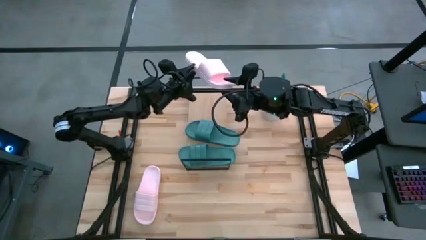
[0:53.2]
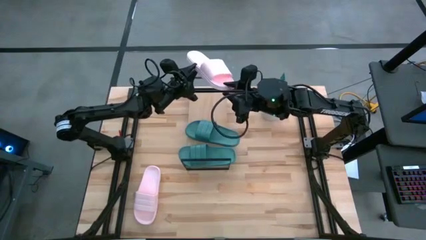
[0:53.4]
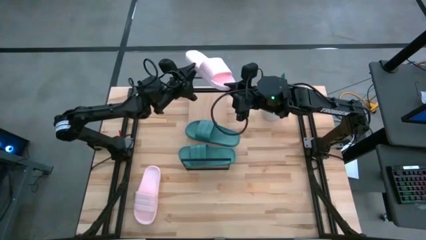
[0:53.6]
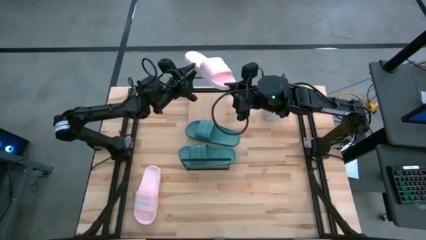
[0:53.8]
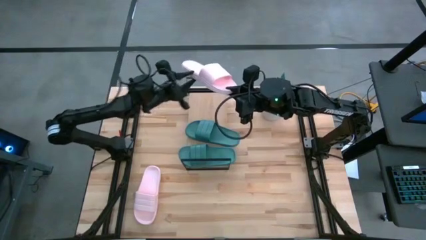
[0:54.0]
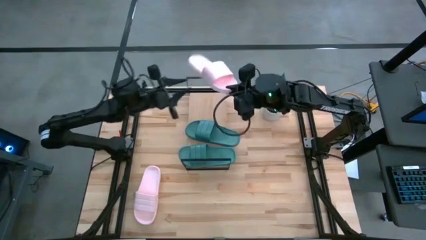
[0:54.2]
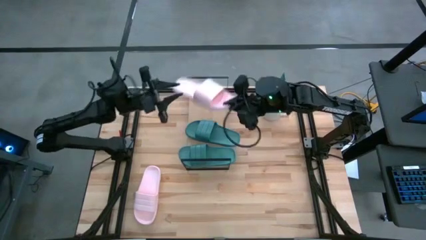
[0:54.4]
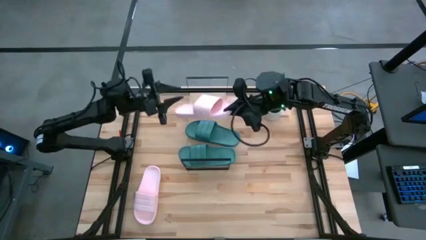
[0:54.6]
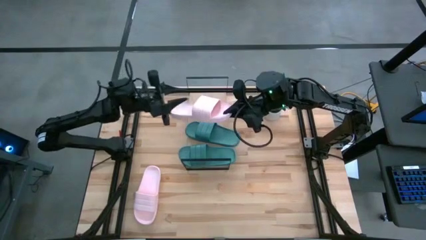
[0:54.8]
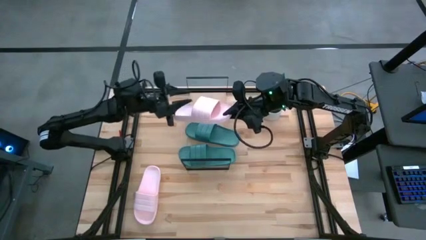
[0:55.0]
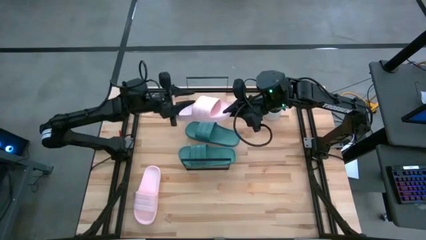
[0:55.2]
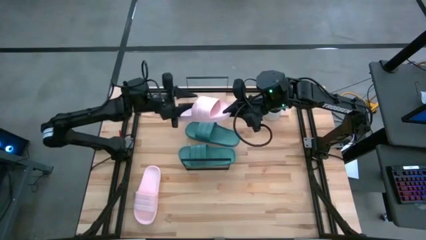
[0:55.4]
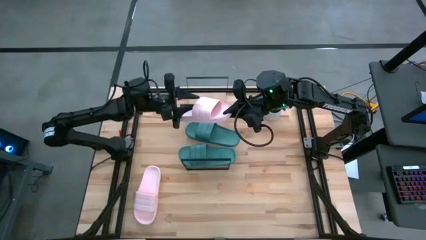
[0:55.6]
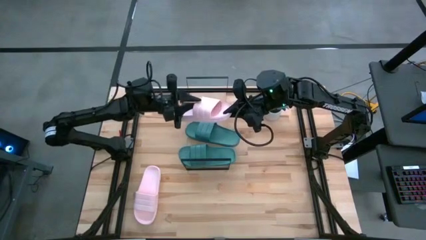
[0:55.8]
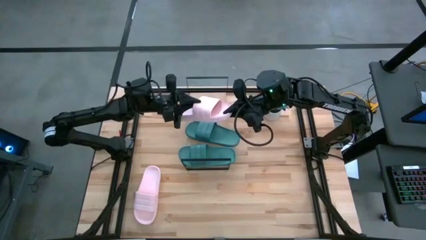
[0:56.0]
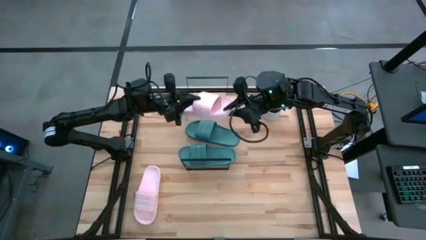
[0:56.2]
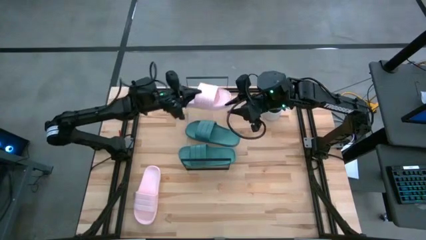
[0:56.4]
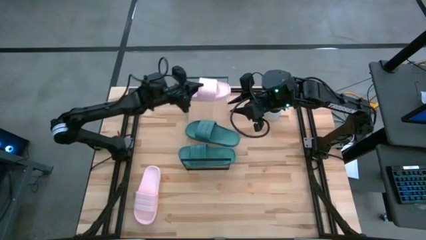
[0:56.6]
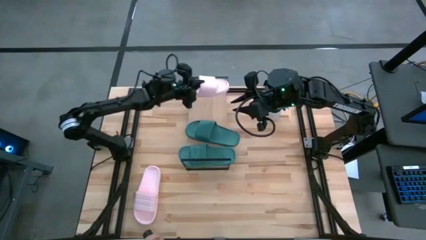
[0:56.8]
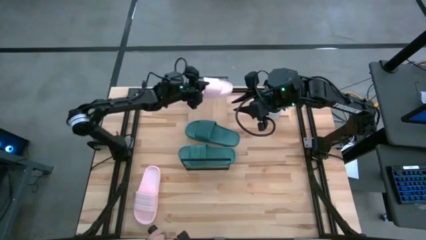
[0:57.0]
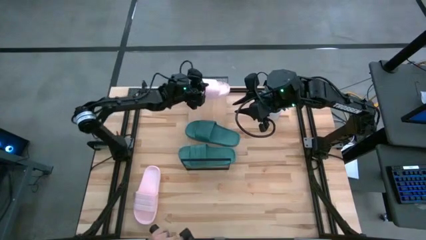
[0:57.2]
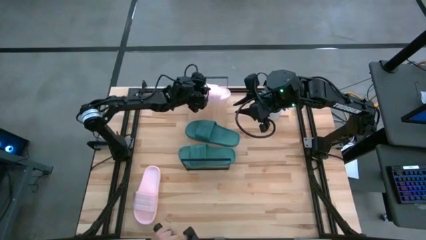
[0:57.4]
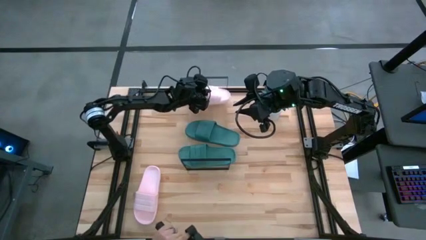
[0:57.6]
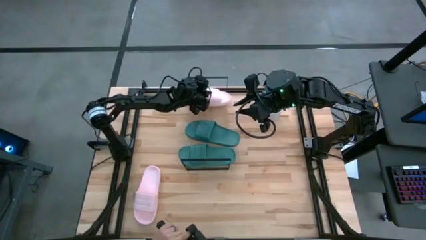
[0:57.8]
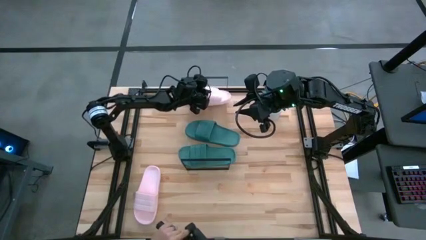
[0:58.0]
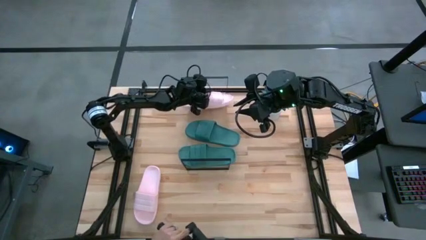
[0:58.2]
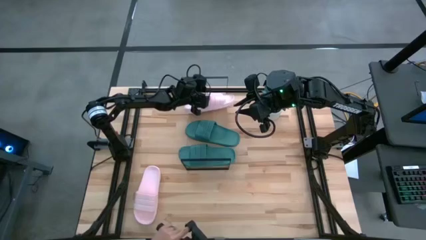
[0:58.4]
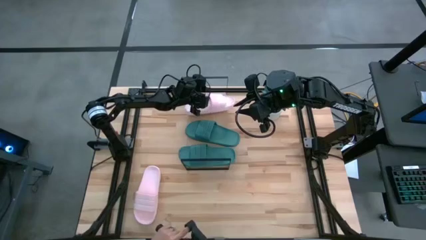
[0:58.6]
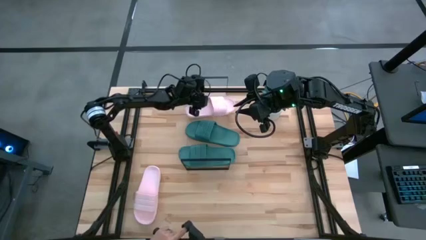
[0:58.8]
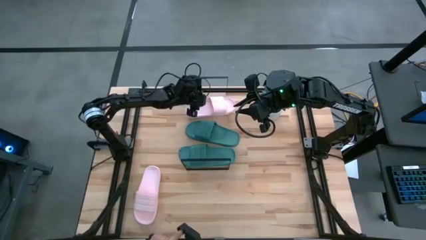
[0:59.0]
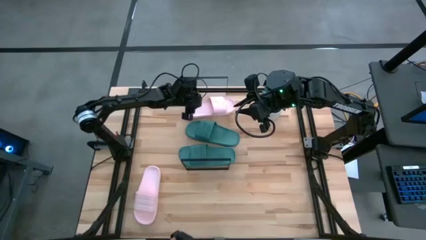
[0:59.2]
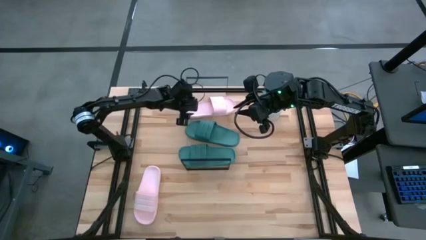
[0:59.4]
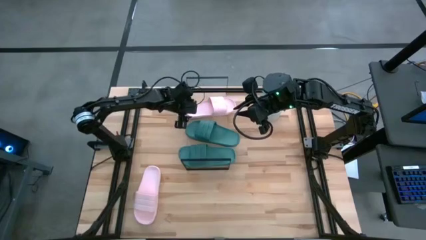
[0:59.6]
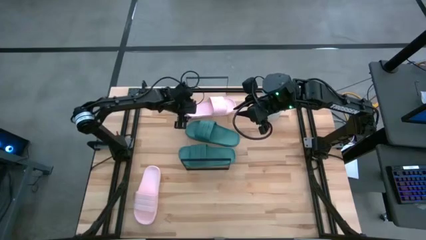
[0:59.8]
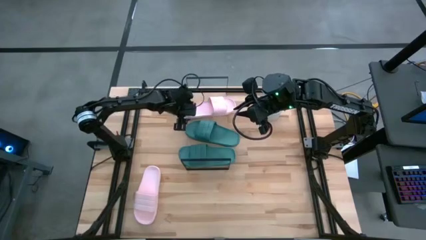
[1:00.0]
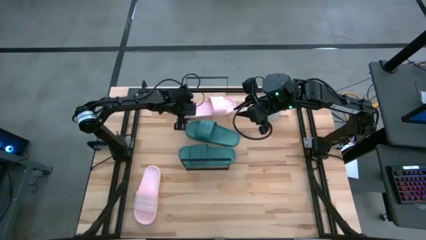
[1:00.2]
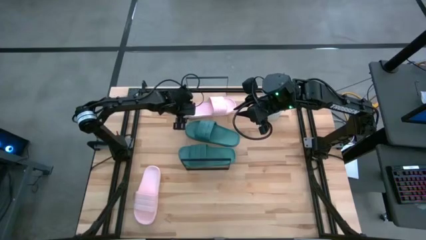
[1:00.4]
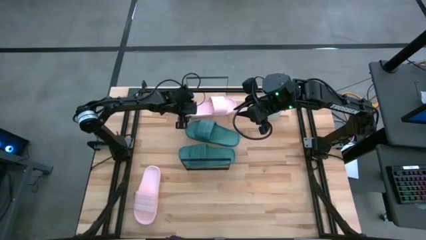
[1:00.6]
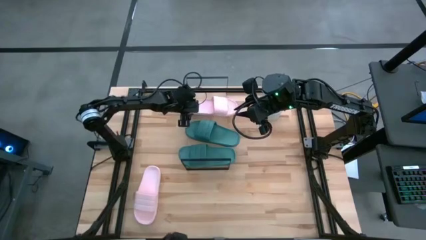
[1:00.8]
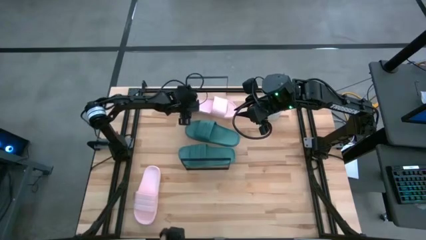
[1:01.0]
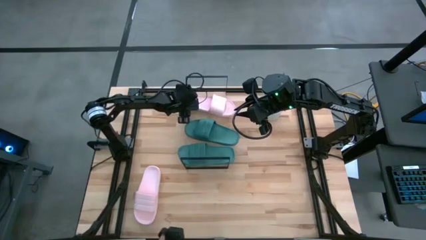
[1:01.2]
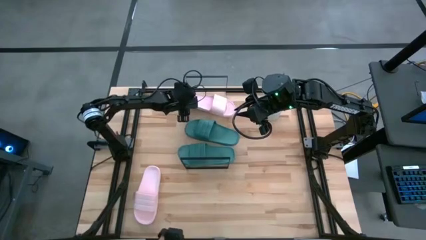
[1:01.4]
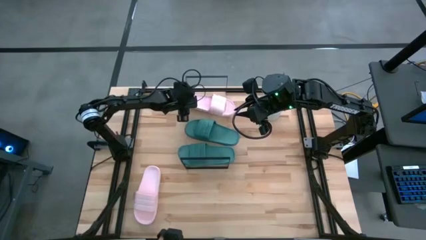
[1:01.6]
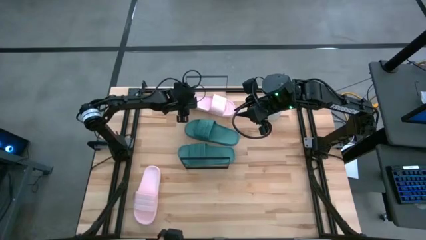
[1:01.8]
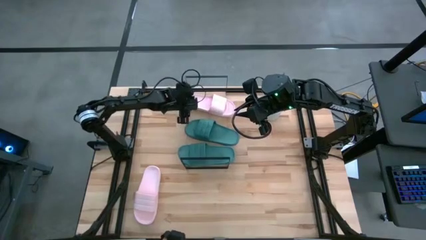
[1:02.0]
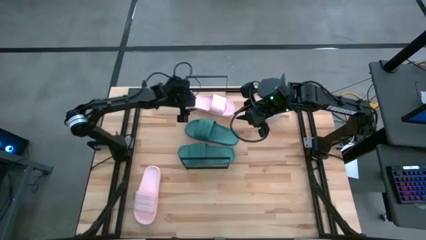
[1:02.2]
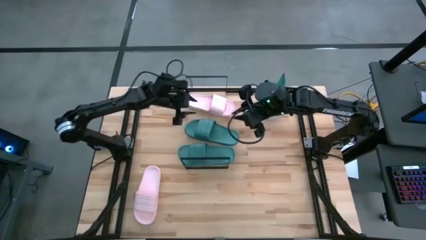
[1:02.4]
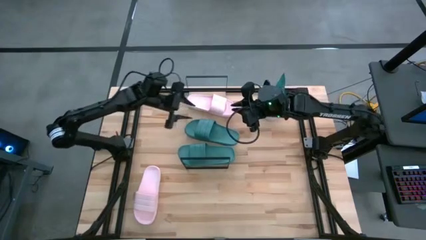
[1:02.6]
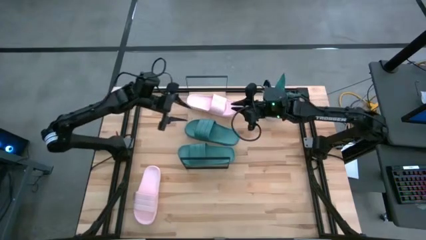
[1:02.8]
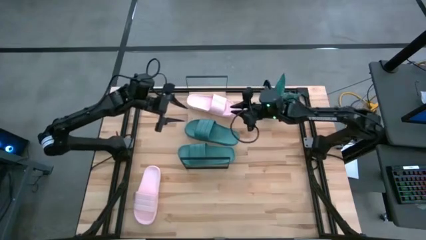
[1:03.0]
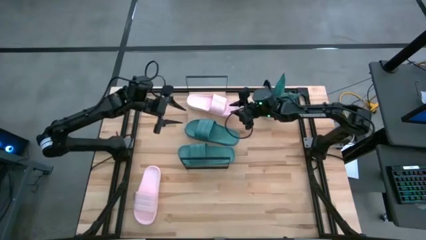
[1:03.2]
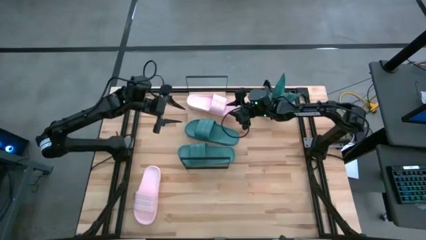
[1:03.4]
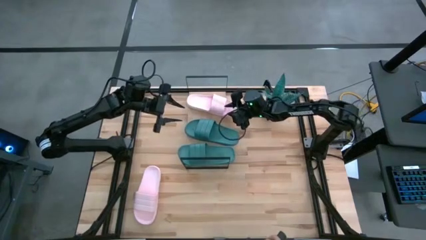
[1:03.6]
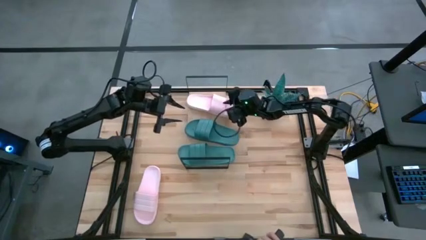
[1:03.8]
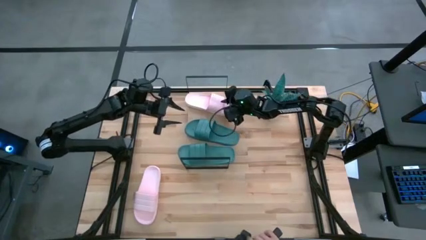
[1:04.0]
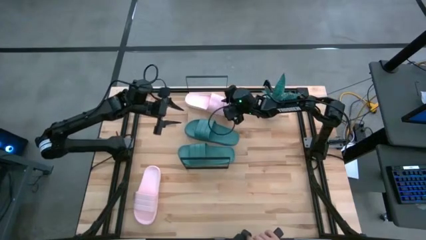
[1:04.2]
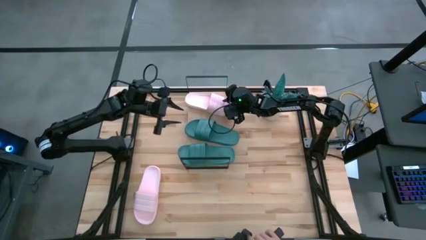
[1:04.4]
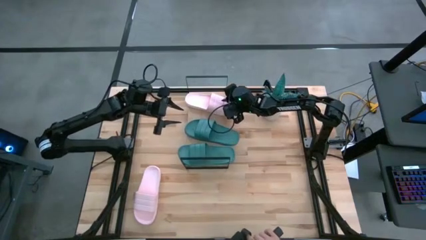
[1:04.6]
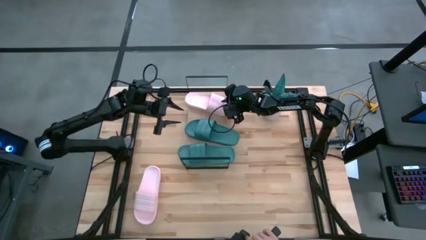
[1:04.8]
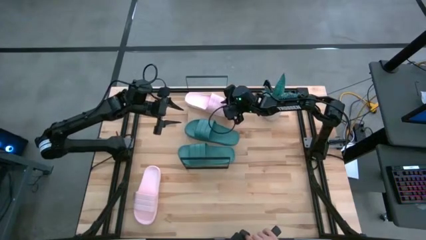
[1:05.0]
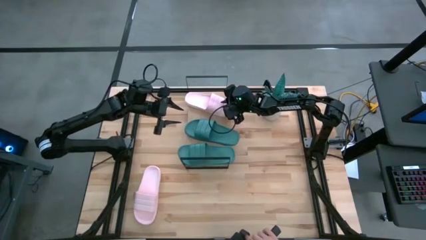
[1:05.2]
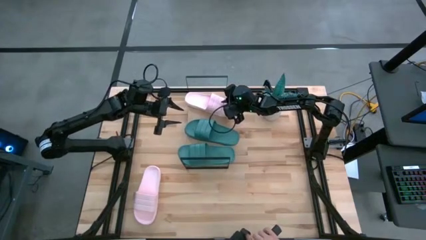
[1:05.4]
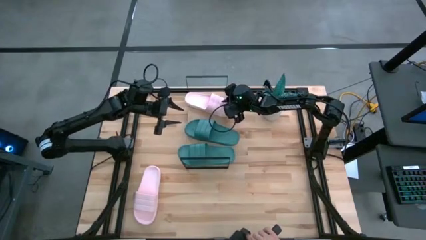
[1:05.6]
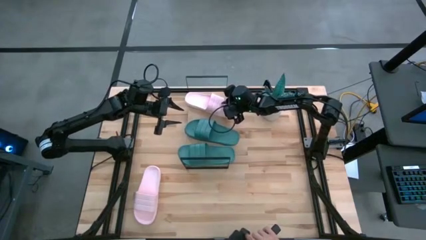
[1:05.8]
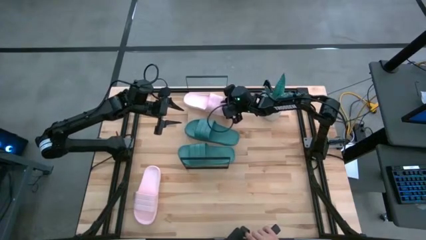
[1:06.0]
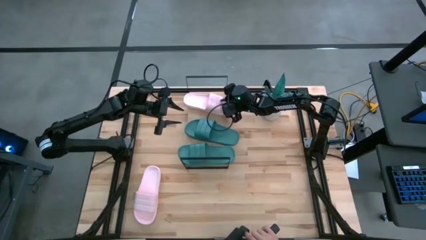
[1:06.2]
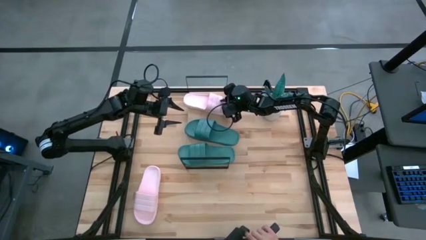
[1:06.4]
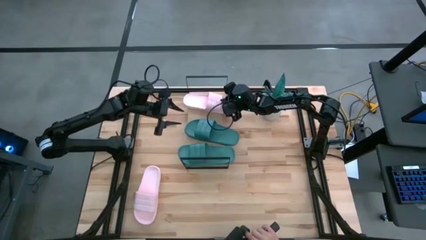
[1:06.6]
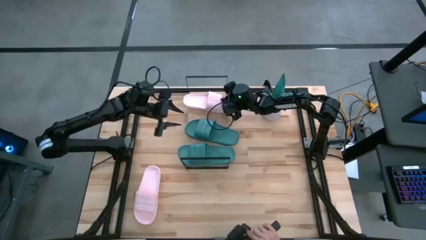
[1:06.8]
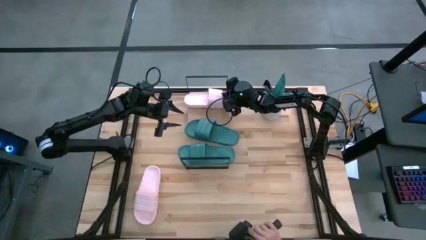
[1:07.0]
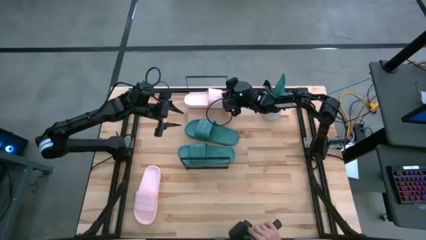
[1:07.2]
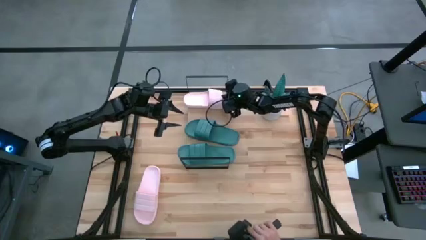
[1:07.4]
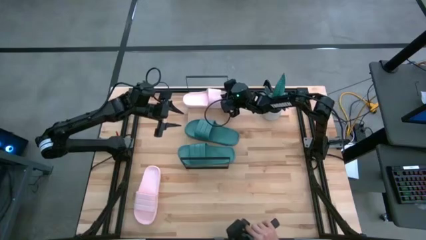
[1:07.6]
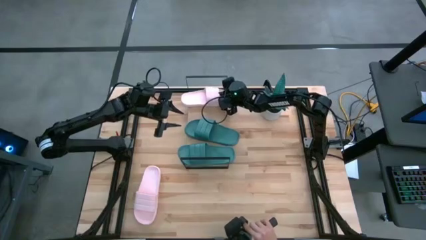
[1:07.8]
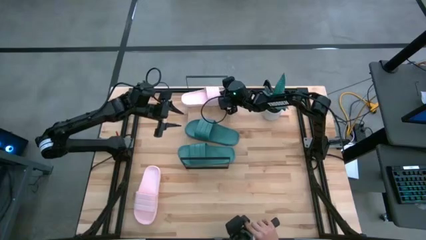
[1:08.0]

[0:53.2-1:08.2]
Task: Pick and place slides into the shelf
Put the top pink slipper on the shelf

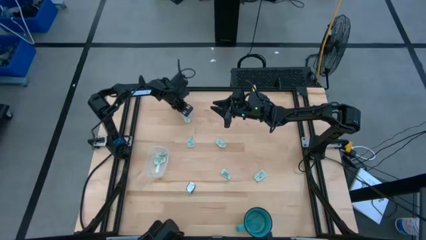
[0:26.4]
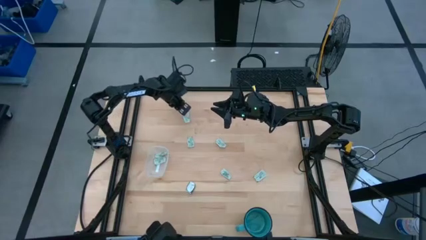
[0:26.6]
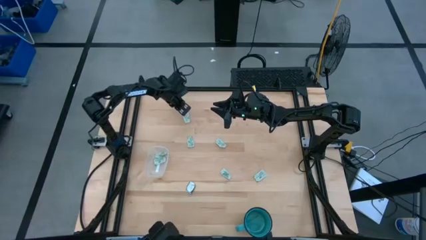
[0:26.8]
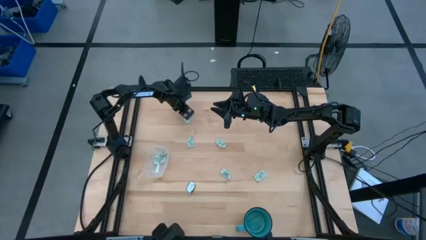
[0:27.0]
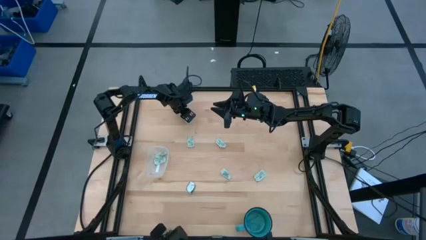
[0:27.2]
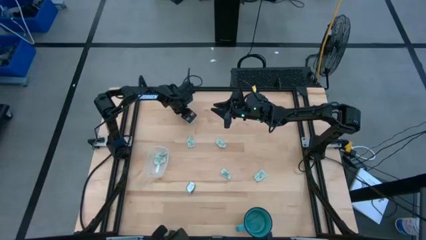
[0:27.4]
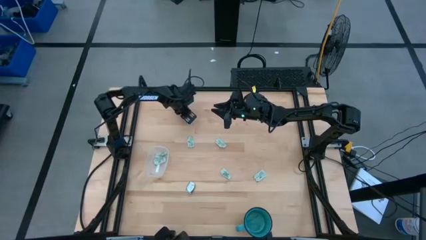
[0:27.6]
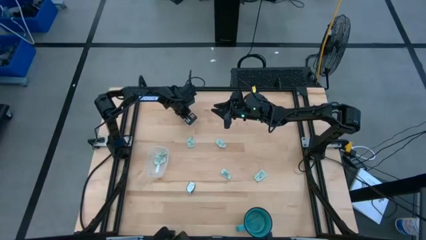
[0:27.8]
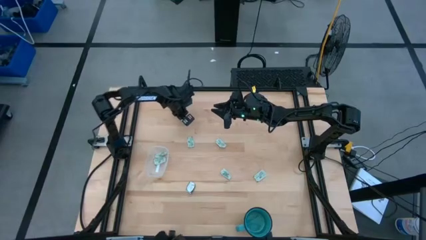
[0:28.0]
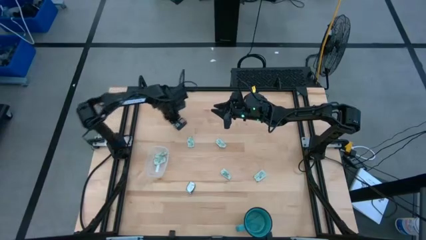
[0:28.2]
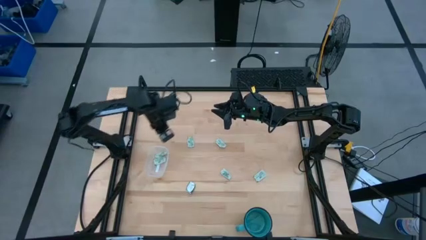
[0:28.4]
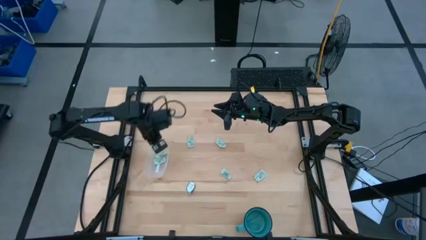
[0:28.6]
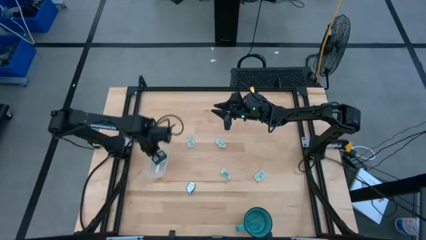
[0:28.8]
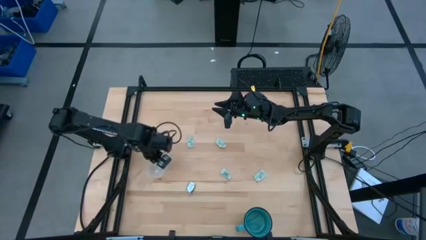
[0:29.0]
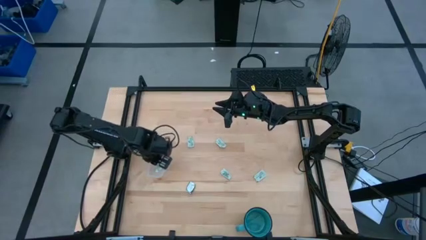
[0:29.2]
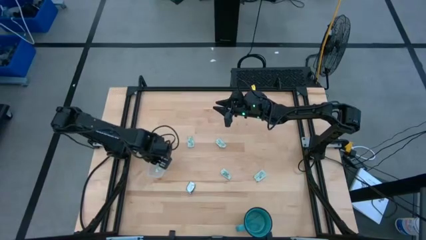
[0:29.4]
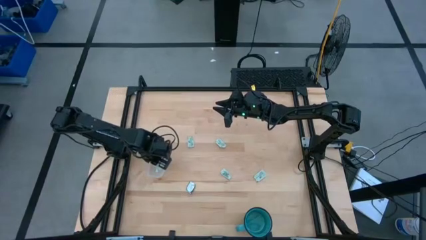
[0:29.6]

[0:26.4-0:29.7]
Task: Pick and place Stevia / Truvia into bins
Put the light green stevia packet into the transparent bin
